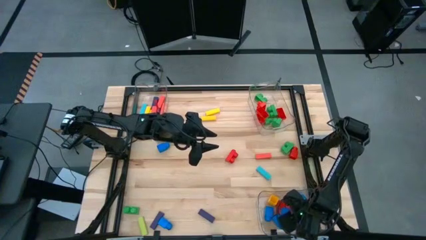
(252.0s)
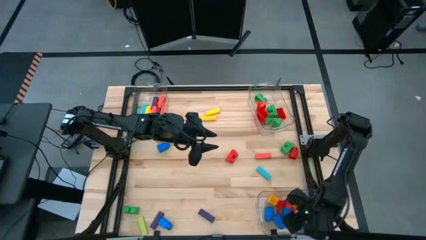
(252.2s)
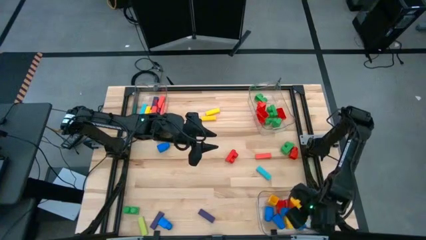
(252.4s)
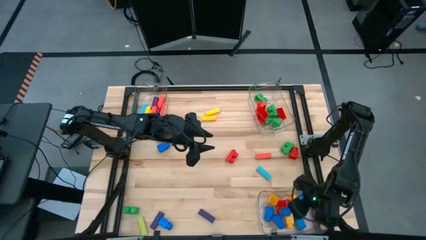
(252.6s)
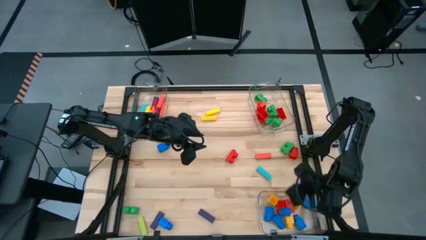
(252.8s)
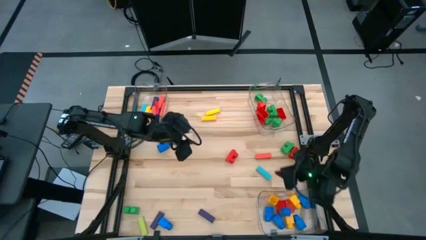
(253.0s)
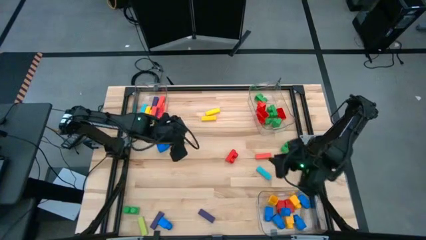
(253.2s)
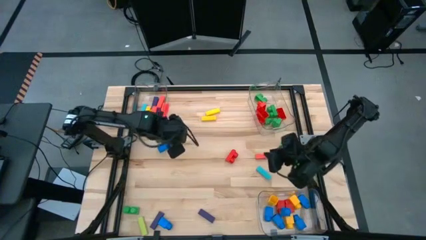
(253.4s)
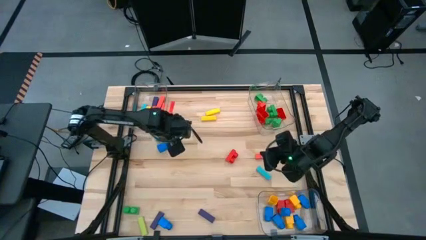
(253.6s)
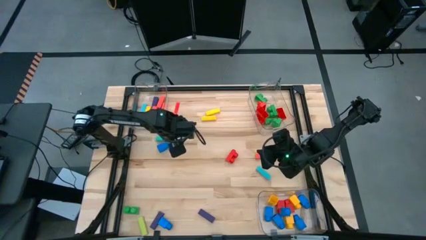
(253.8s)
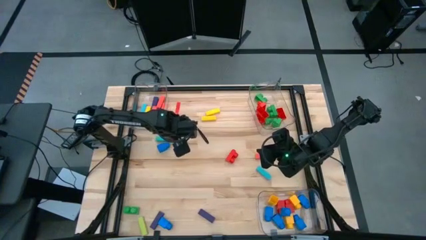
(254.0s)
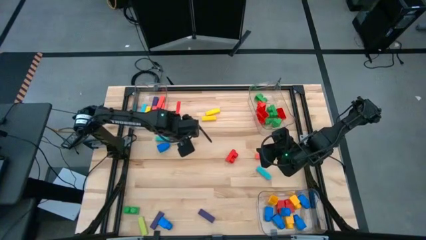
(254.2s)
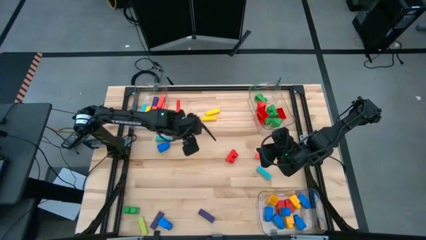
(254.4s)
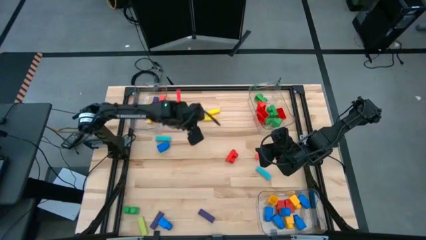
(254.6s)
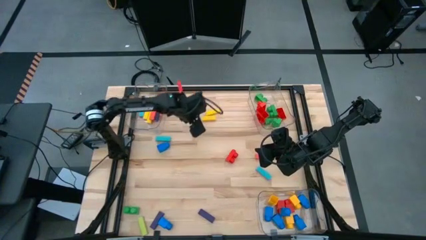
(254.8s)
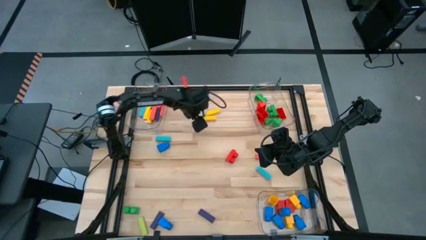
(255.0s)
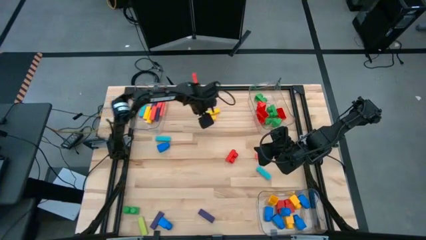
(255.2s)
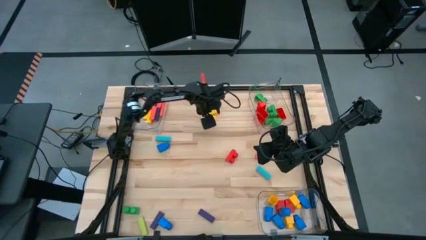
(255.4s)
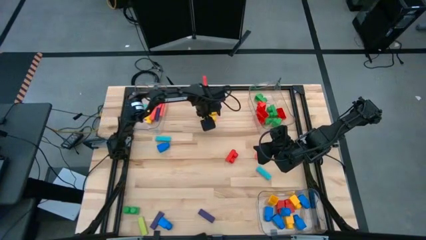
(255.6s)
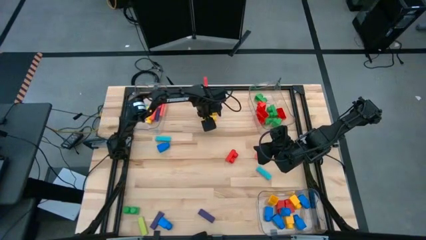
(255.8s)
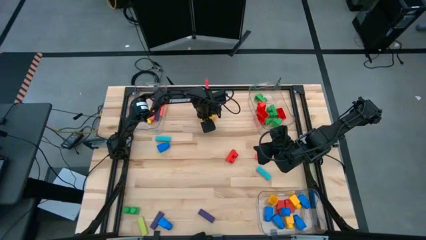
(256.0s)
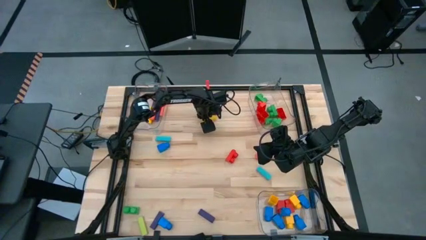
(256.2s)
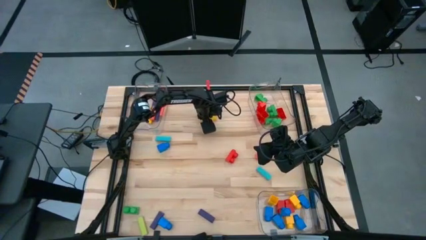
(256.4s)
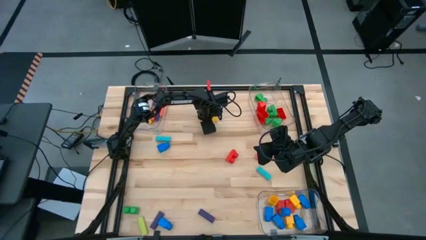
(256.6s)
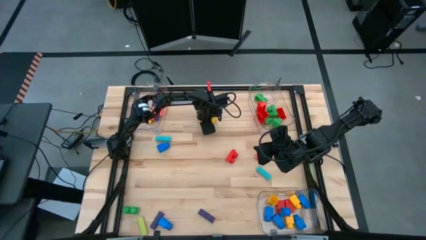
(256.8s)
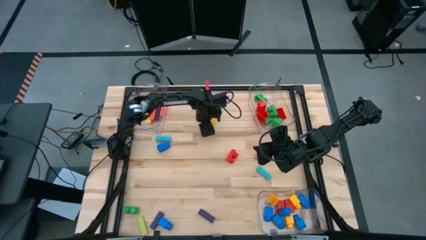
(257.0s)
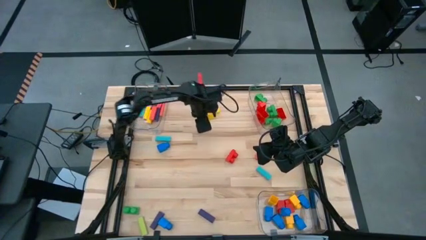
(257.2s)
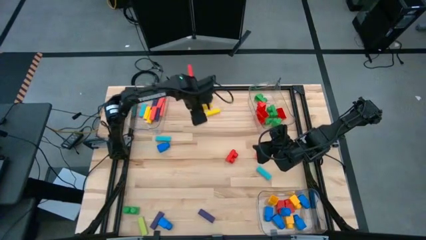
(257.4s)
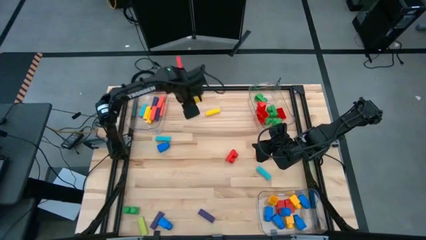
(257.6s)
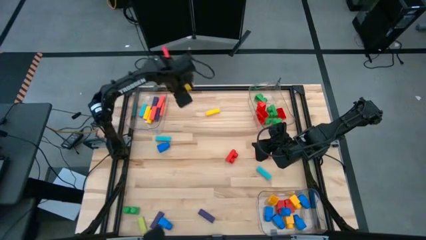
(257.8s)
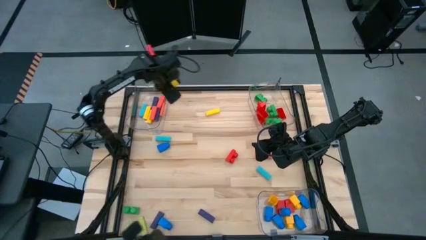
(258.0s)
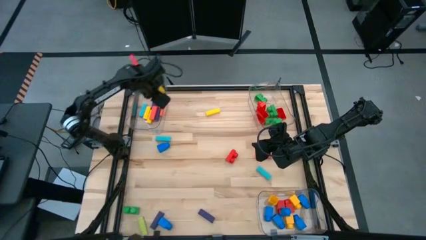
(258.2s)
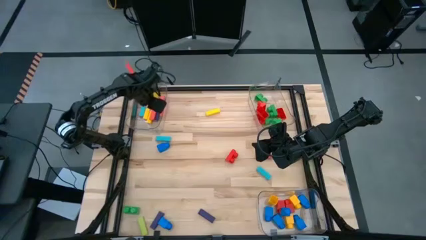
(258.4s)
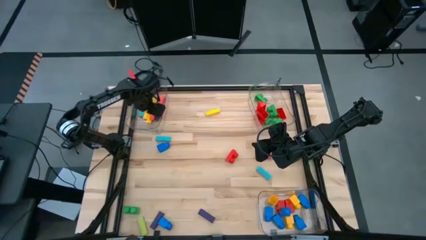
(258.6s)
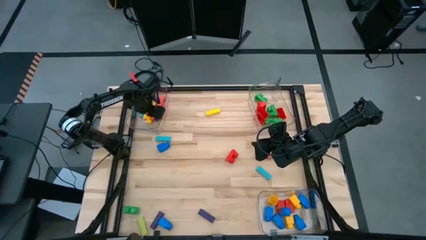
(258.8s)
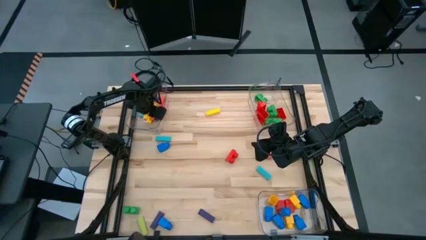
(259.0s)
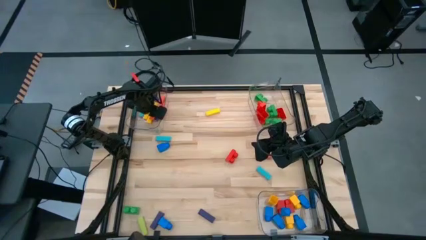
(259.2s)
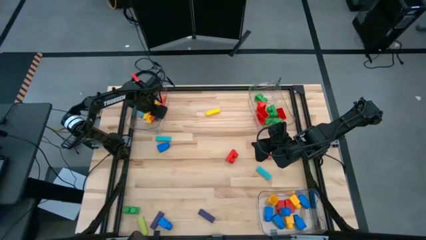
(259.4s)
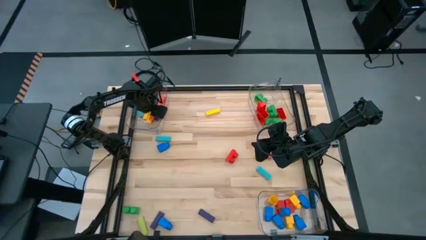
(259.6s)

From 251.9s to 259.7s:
Task: Sort blocks by size
Put the yellow block into the top left transparent bin

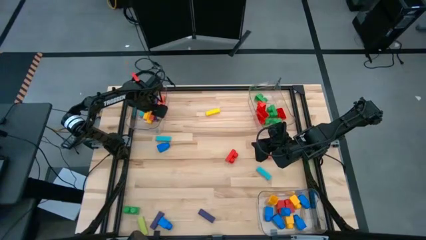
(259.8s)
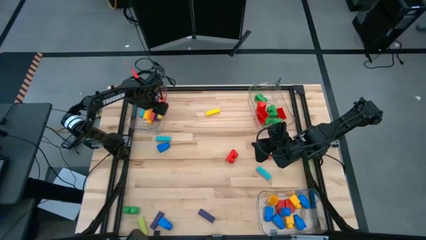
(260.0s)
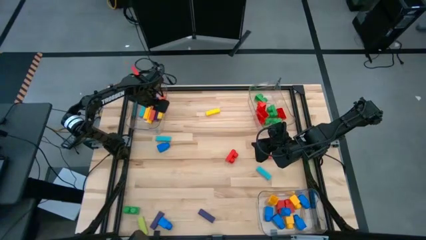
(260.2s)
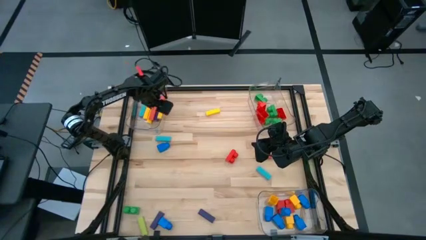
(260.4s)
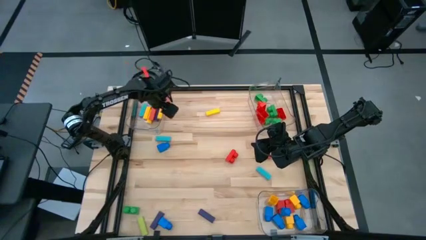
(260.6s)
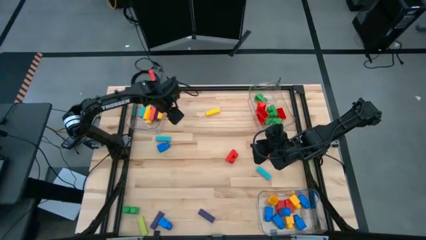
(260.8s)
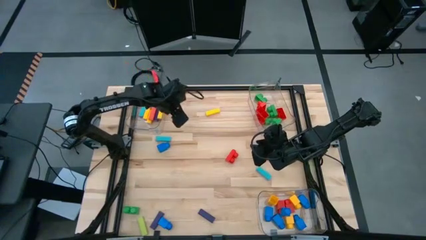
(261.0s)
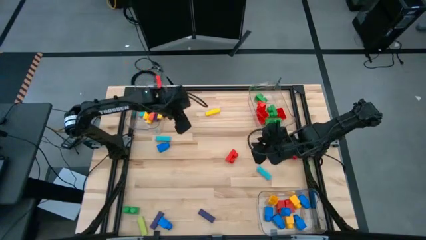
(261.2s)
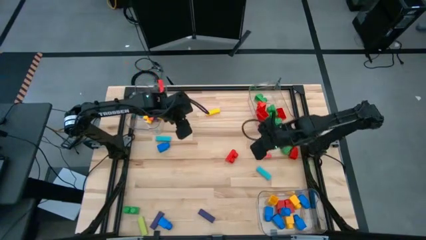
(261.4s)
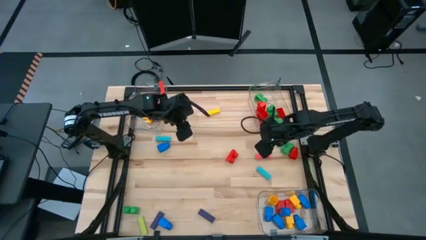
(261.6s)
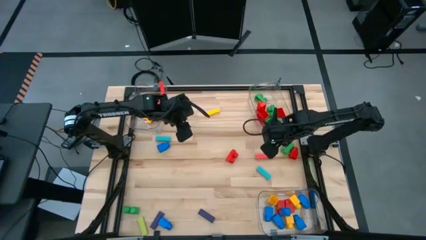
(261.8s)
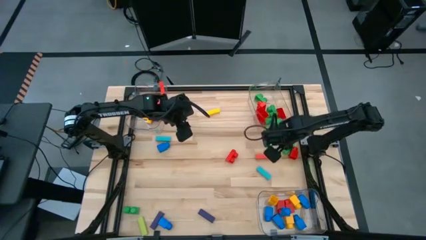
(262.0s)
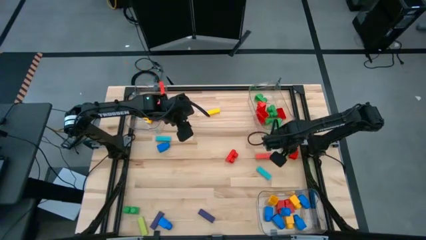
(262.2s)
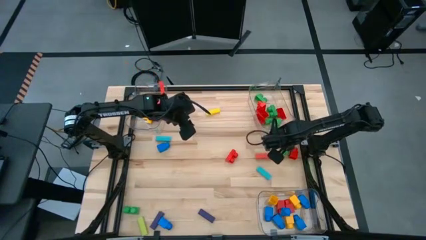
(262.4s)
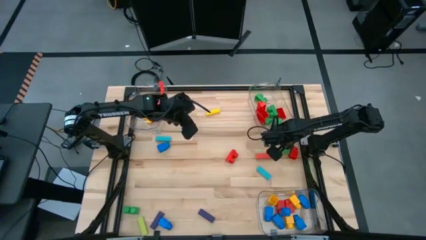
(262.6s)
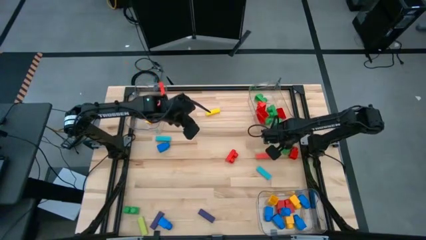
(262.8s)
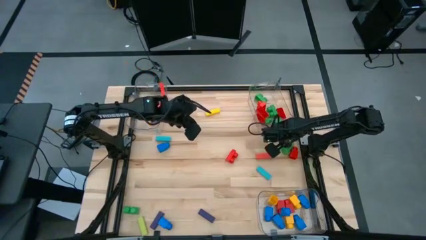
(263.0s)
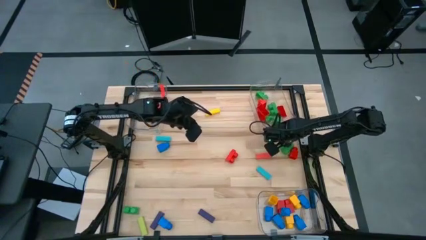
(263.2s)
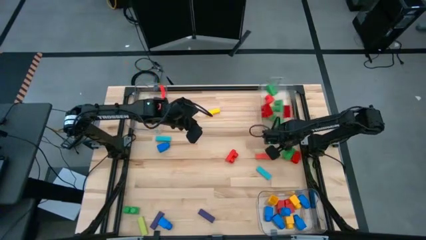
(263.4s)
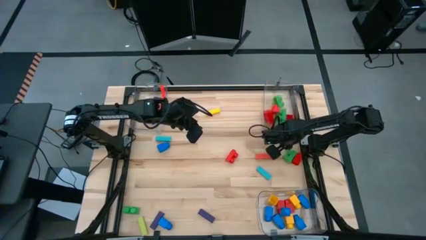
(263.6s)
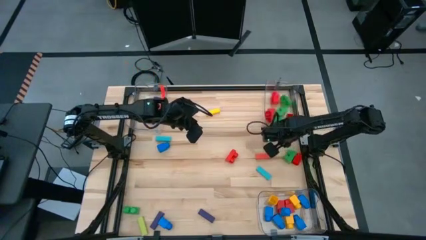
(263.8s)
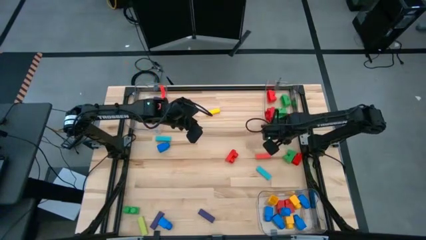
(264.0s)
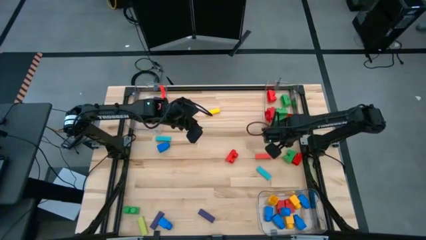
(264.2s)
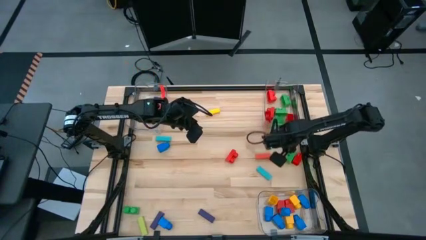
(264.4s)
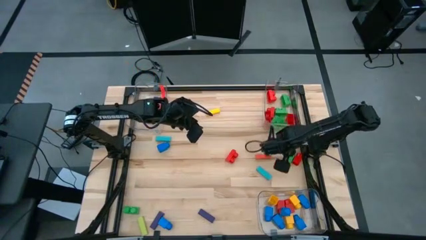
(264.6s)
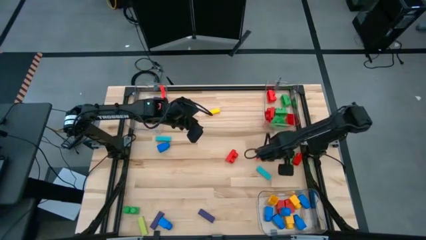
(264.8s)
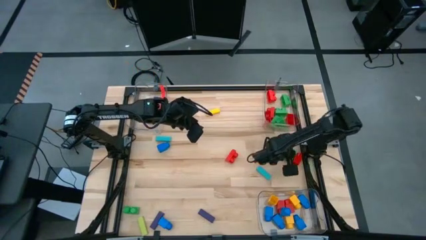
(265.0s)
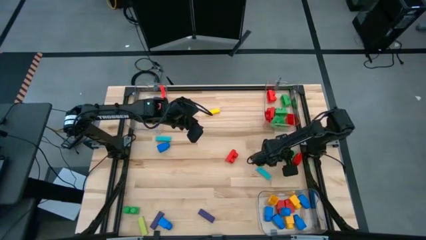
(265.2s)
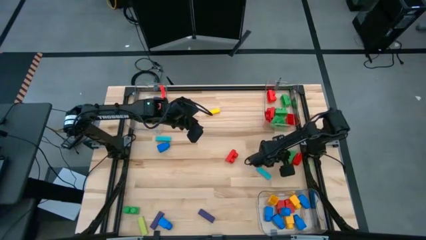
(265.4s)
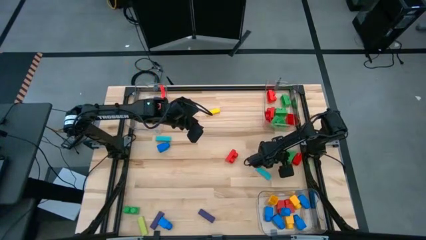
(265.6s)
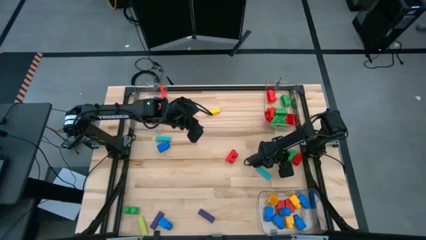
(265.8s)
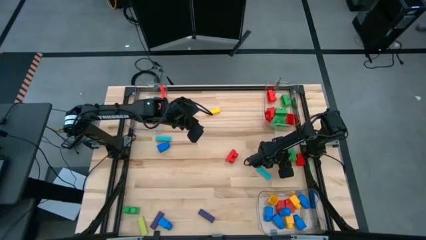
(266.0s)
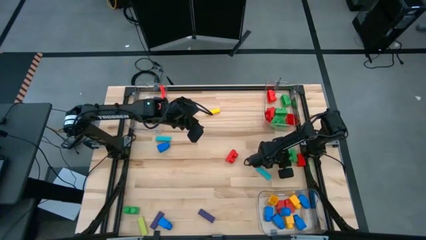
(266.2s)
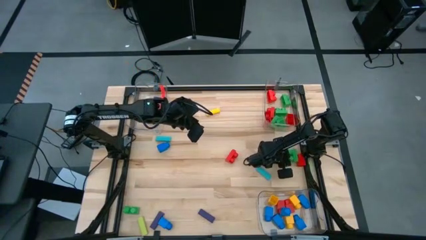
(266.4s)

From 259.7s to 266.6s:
Put the green 2 stud game piece into the top right transparent bin

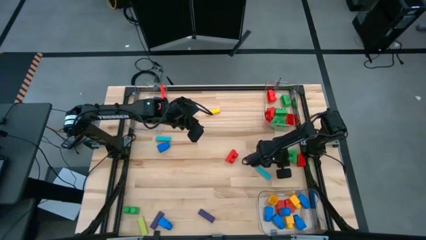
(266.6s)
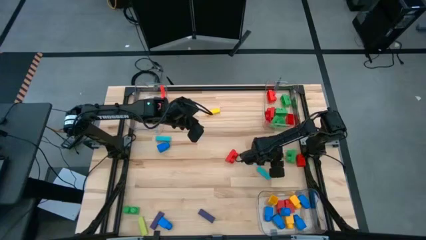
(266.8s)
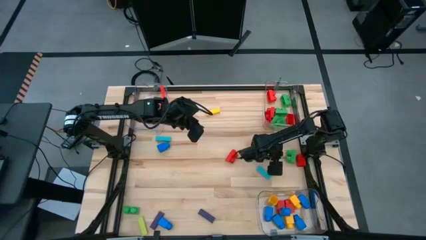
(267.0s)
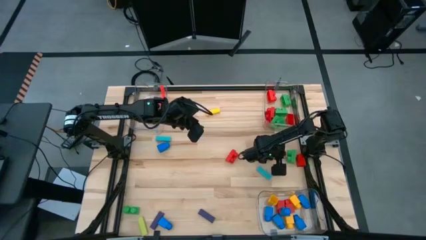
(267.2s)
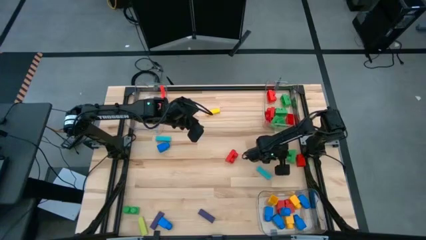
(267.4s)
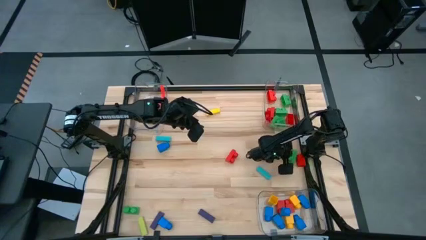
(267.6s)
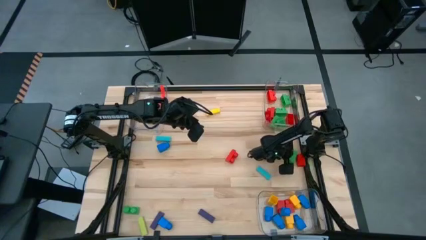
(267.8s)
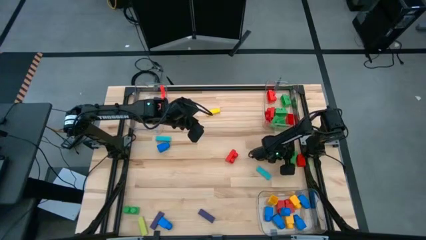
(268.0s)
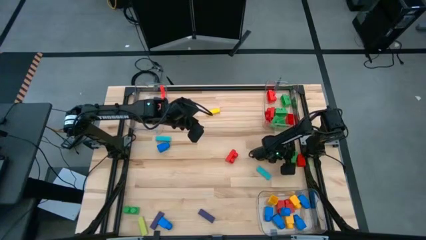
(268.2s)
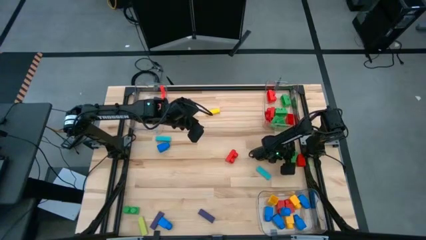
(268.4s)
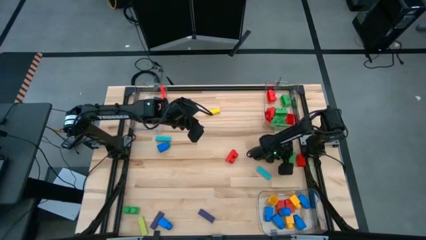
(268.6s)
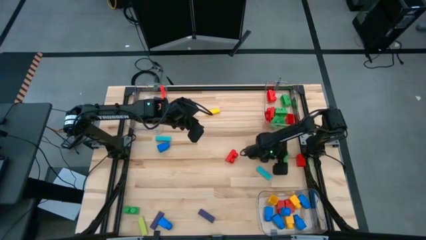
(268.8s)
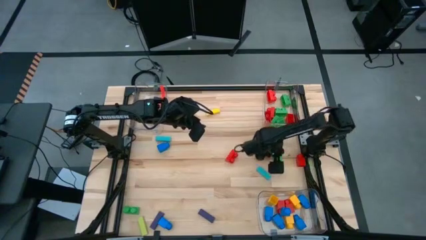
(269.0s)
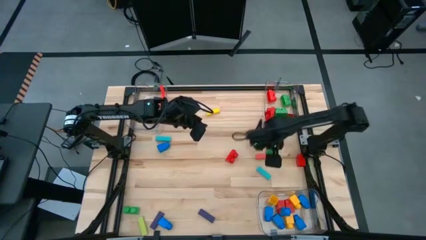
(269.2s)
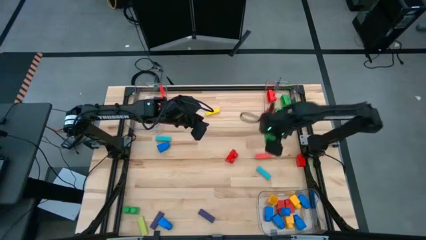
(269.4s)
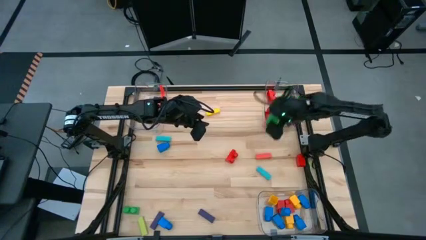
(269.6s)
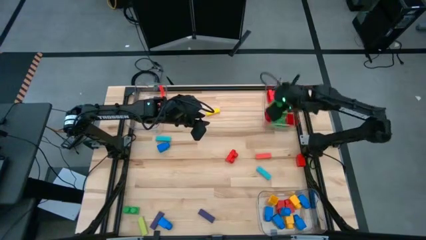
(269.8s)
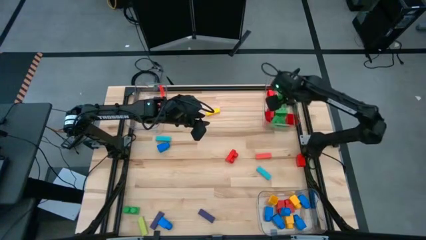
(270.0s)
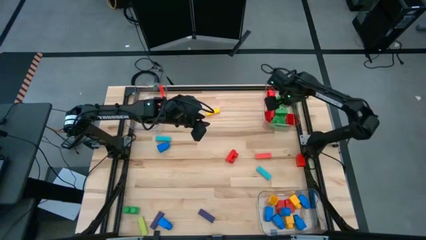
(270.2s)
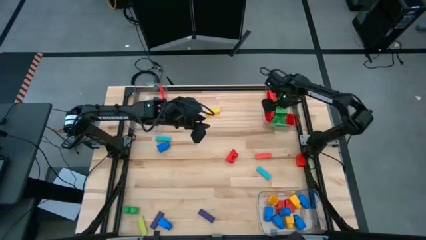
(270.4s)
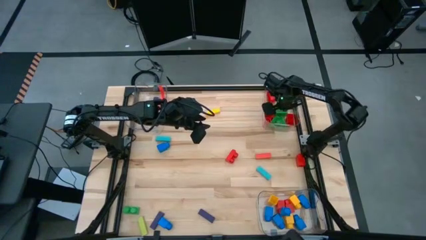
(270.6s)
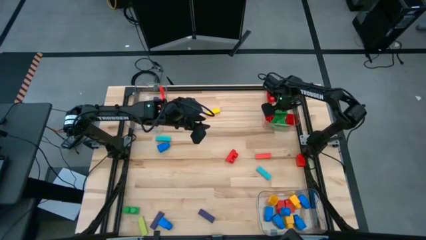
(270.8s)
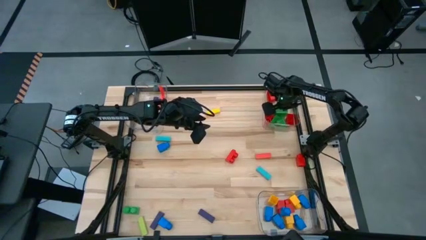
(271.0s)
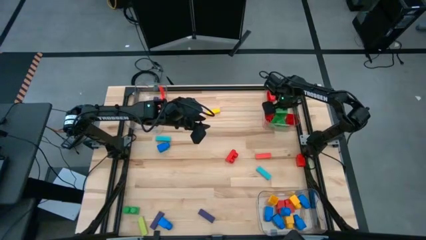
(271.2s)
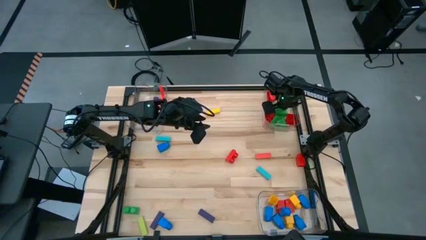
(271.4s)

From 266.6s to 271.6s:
Put the green 2 stud game piece into the top right transparent bin
